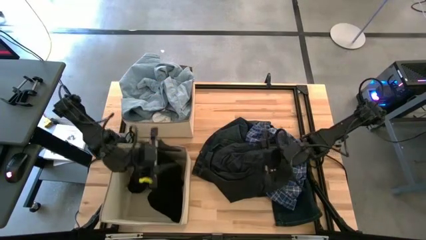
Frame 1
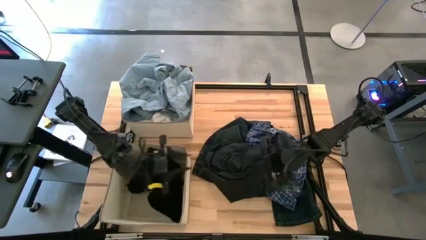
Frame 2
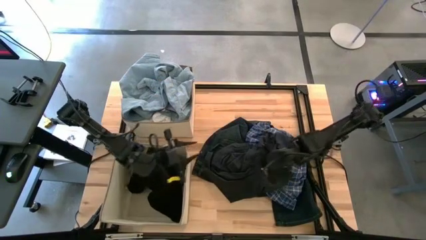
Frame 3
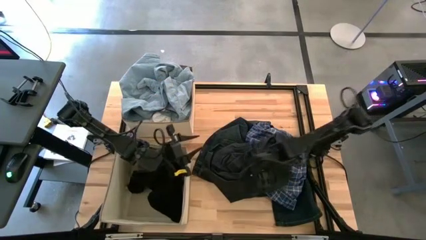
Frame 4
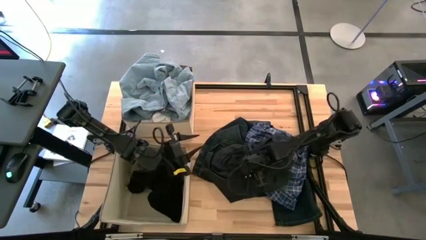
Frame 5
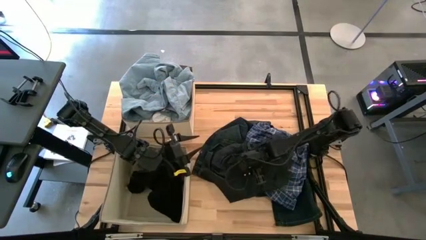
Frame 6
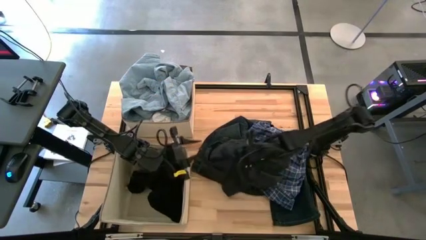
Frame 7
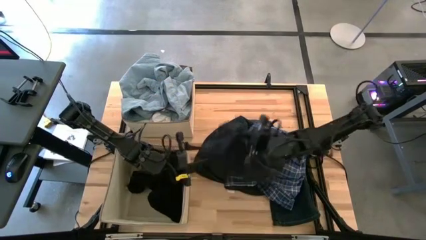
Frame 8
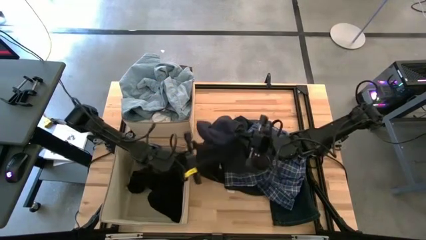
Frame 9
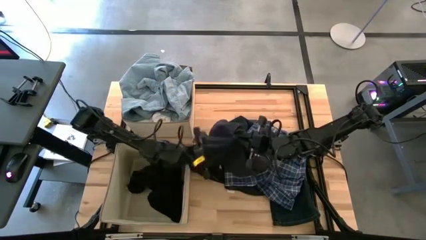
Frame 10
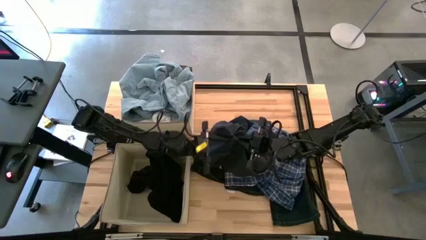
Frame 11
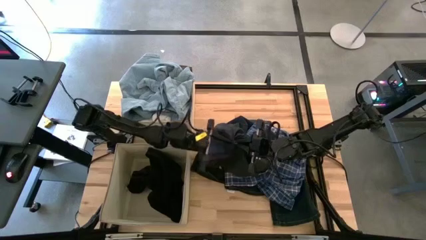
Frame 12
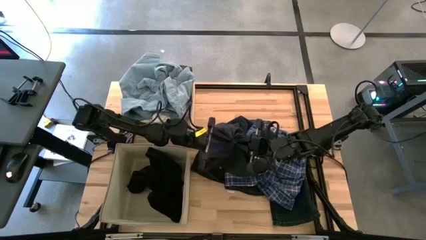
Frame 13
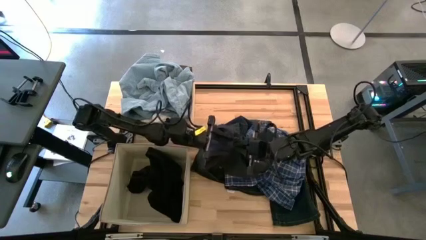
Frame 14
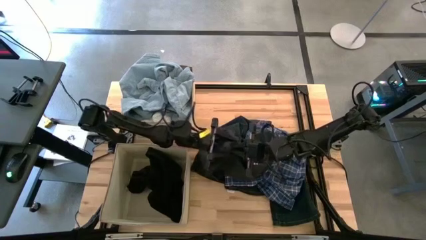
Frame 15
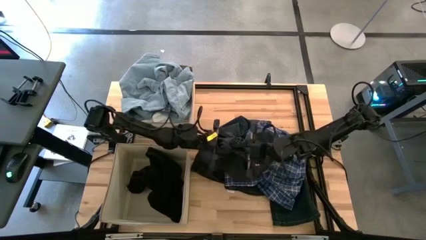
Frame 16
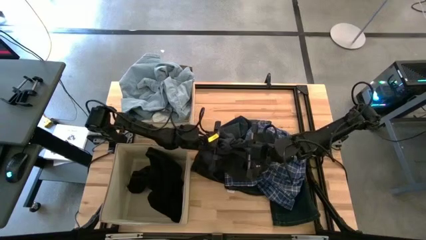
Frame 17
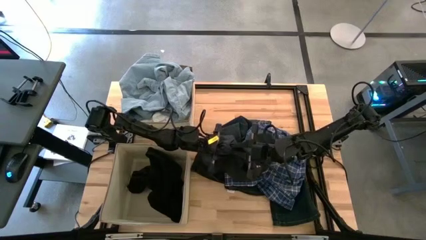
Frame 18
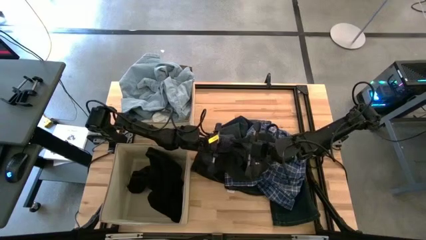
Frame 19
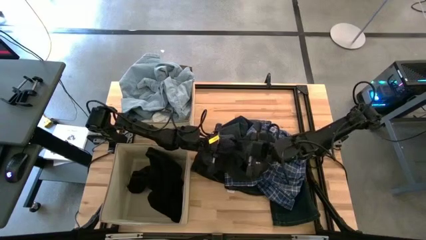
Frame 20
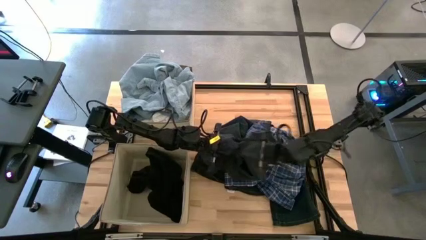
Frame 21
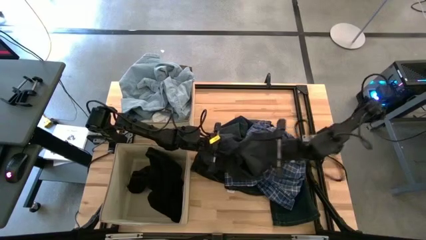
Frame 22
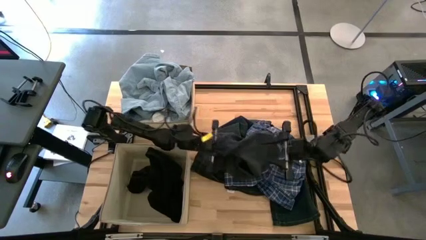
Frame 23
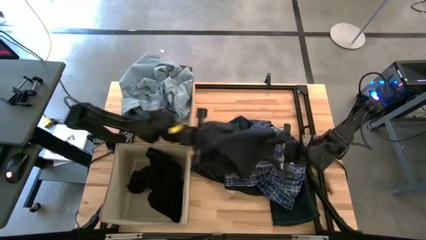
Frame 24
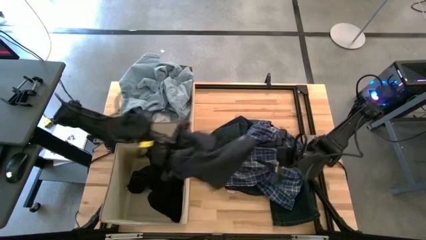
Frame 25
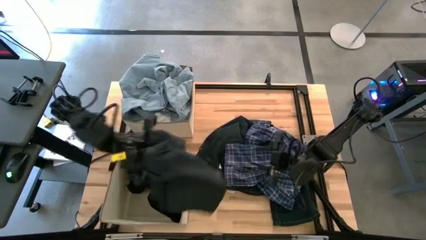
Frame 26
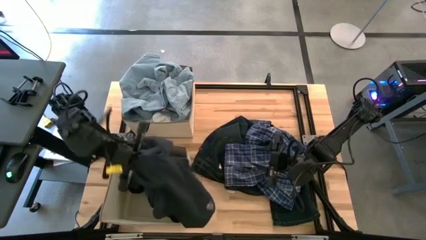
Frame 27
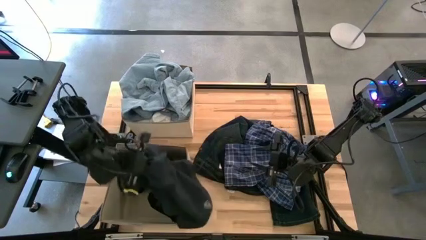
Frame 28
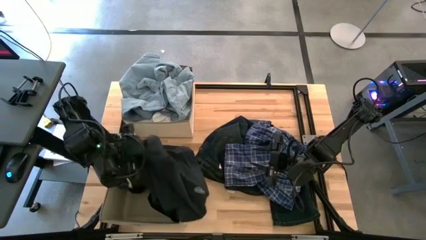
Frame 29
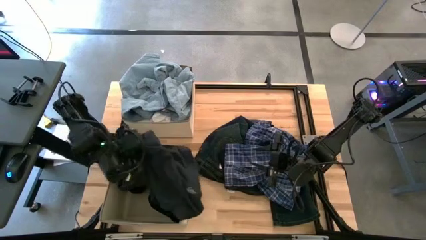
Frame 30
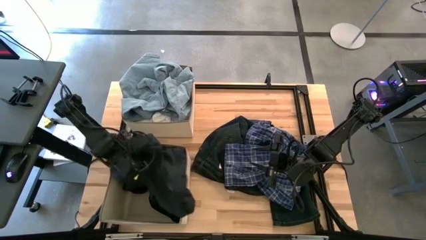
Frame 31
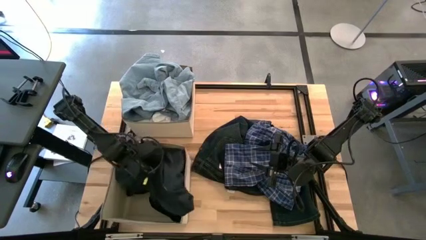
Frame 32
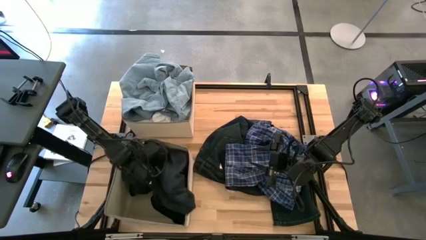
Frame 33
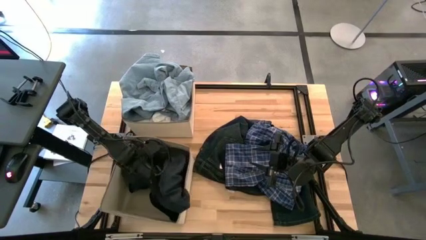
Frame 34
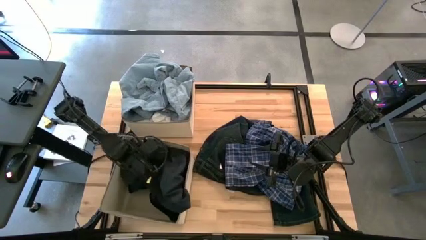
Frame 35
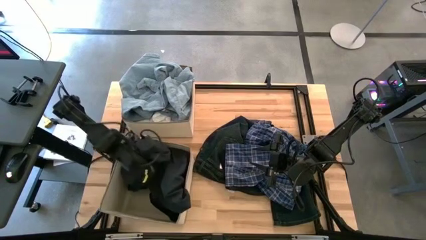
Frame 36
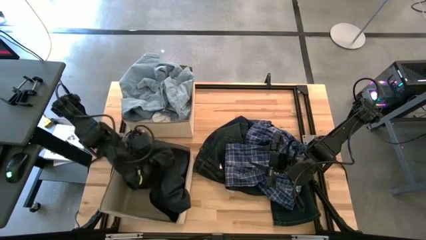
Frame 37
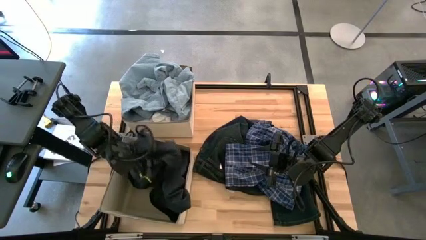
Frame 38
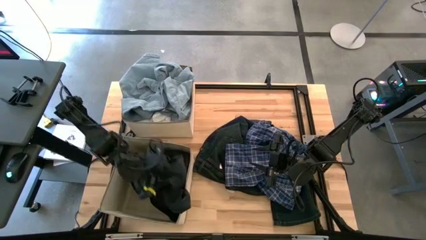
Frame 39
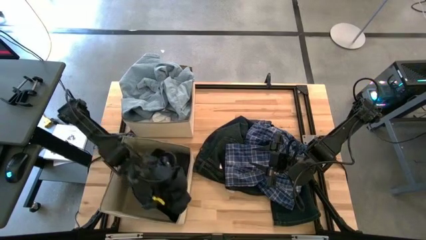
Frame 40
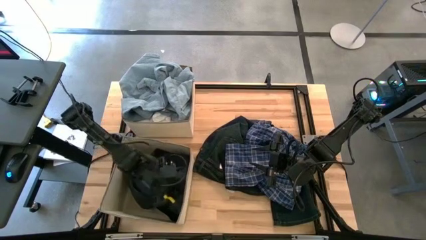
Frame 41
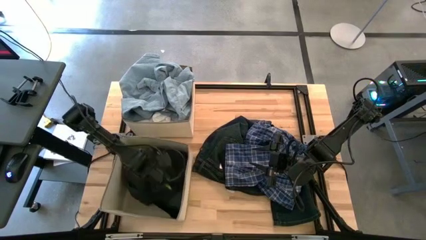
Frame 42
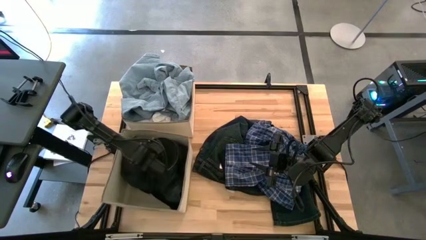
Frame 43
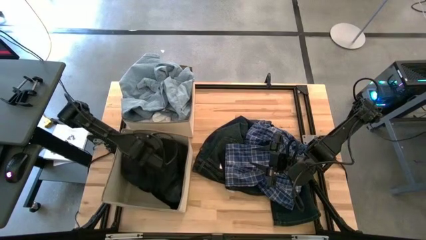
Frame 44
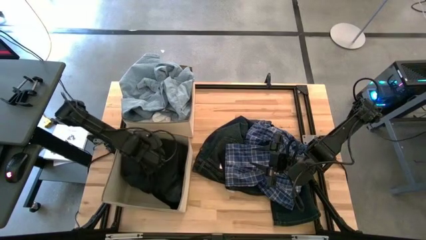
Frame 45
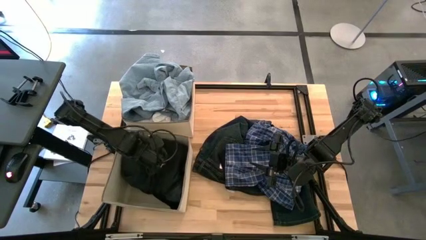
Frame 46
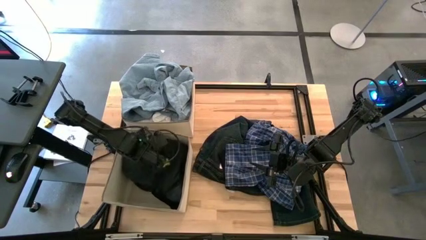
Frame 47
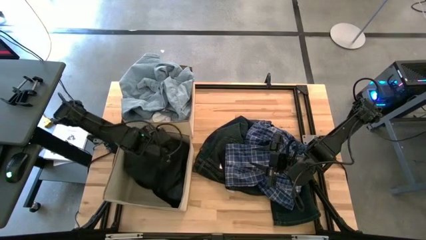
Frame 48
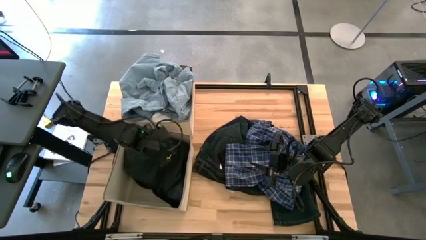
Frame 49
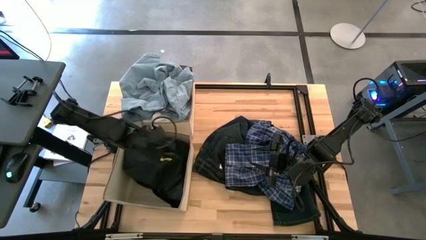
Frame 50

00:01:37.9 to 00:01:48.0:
Task: Sort clothes
Put the dark blue jeans into the bottom brown laundry organizer

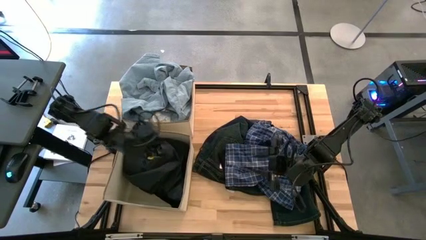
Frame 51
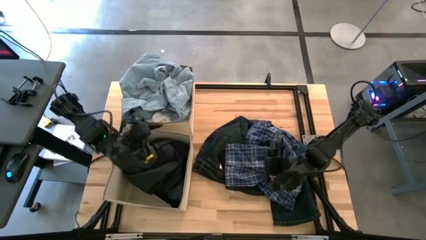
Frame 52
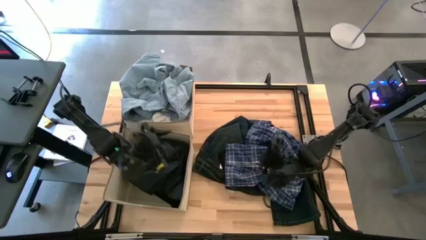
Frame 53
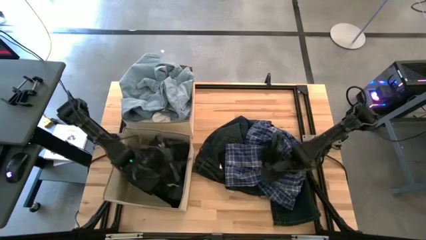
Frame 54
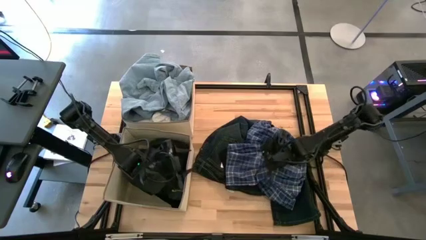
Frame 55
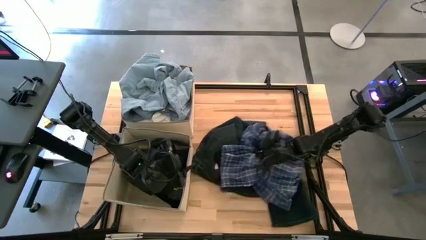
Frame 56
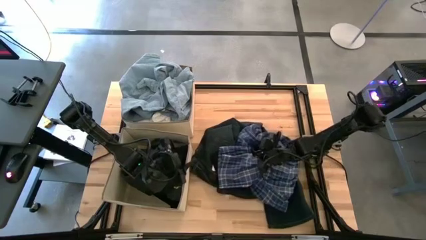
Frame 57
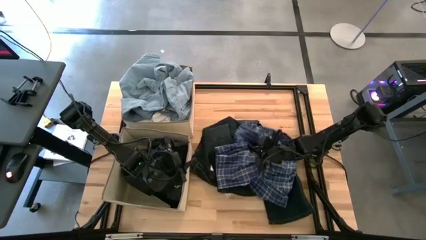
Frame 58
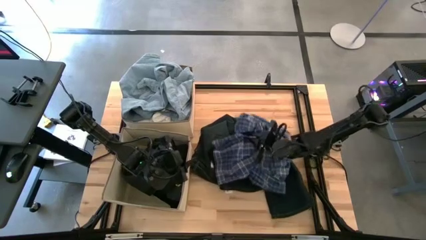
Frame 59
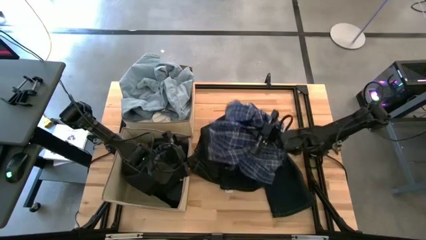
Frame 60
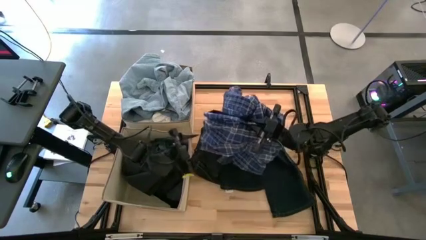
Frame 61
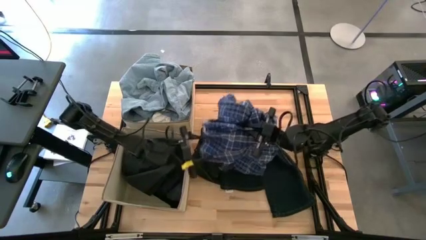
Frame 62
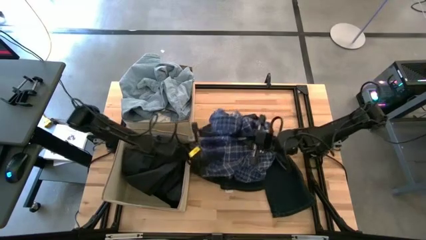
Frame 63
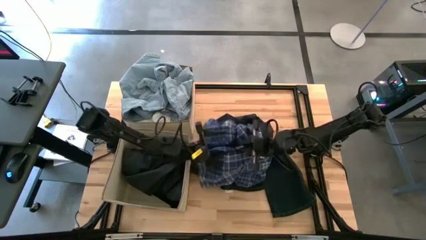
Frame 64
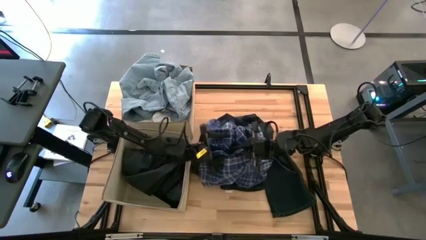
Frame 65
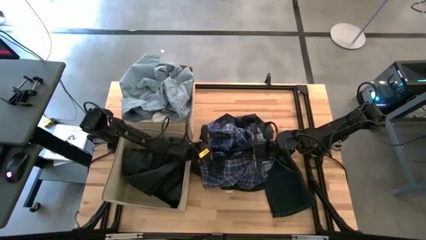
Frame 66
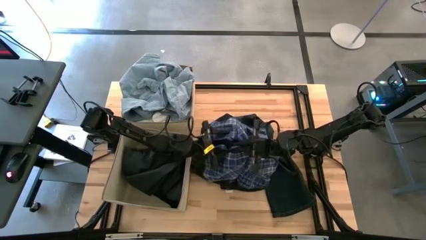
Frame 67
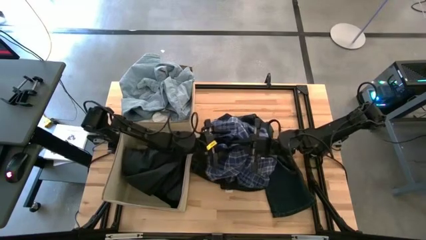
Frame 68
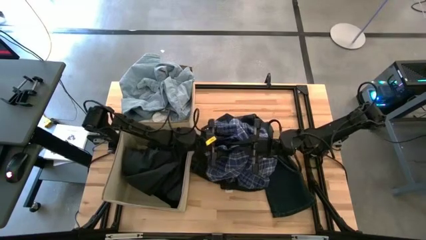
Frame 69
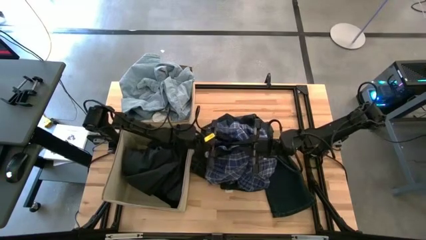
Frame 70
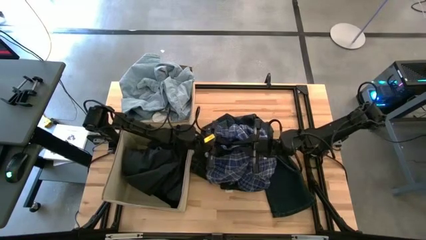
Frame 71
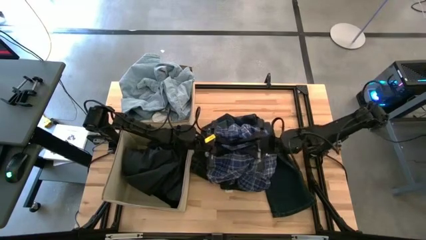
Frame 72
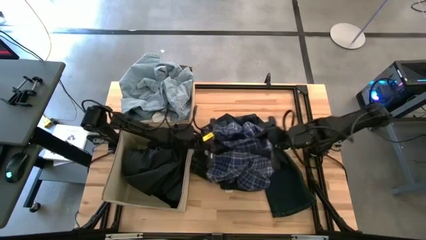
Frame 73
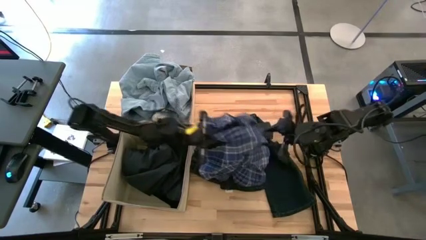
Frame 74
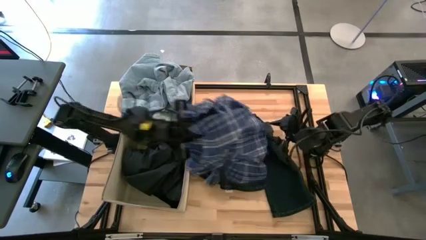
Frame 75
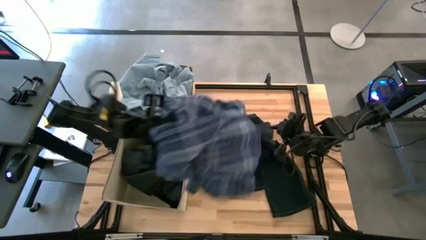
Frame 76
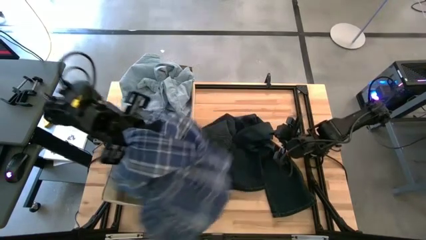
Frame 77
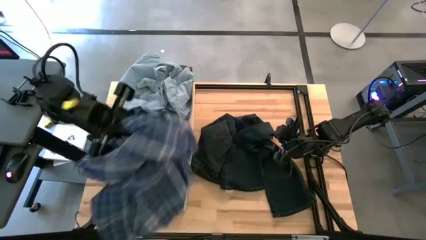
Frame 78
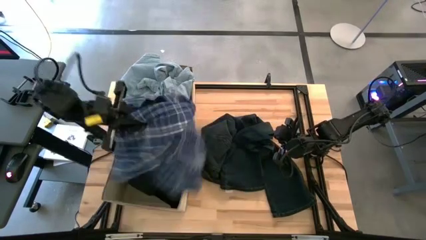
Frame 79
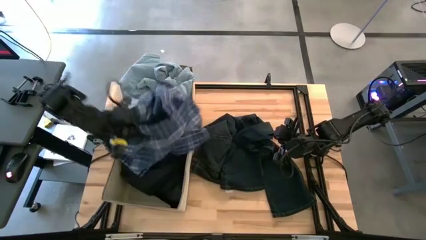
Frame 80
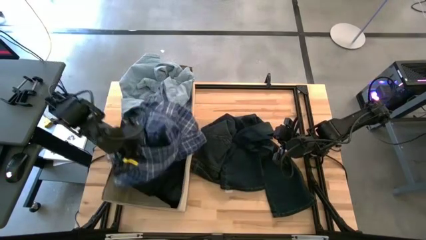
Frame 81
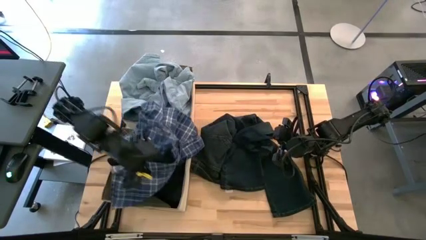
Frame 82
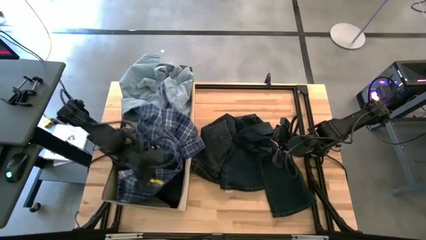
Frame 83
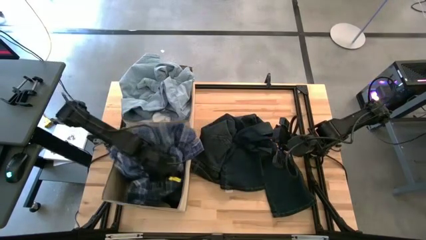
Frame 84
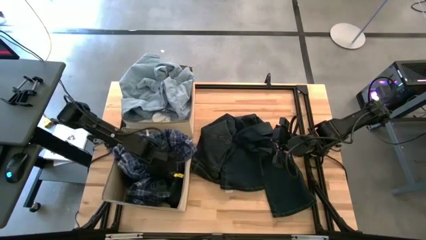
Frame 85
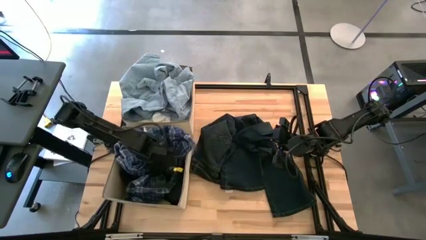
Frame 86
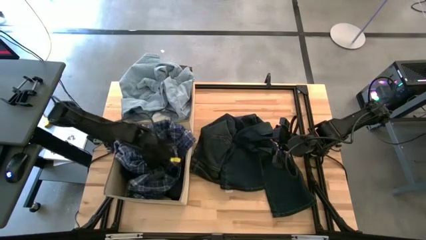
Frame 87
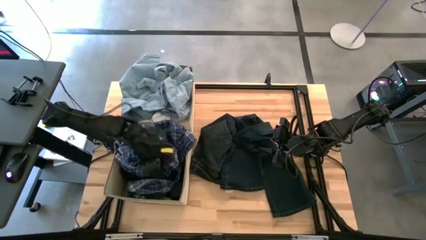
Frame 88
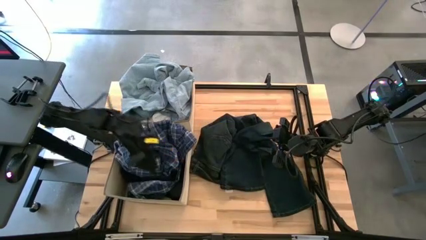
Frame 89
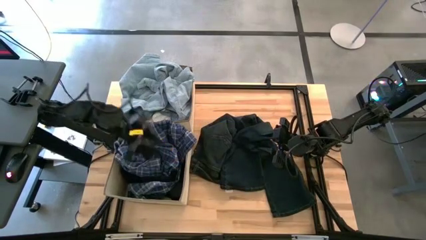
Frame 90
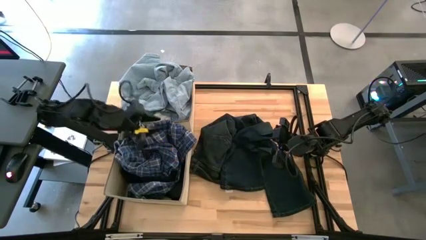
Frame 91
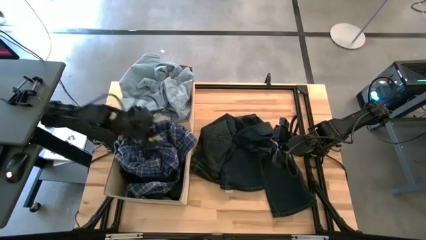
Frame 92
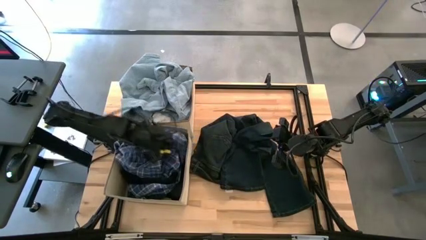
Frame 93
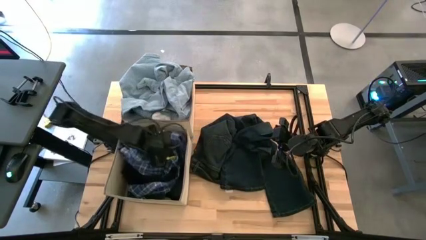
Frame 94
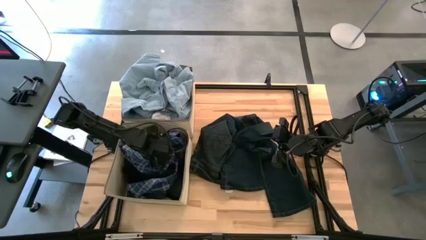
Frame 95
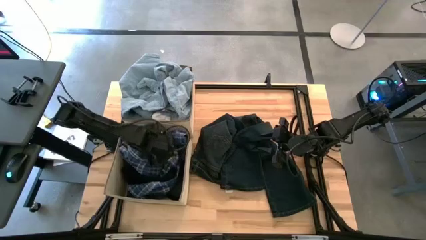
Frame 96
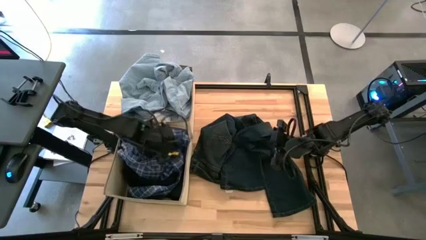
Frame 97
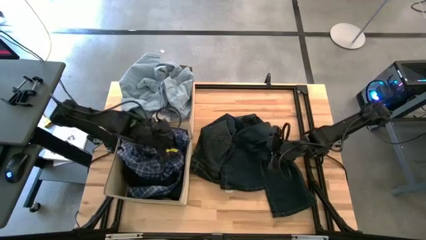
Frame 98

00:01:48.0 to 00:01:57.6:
Put the checkered shirt into the bottom brown laundry organizer
